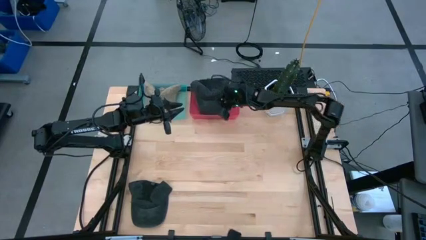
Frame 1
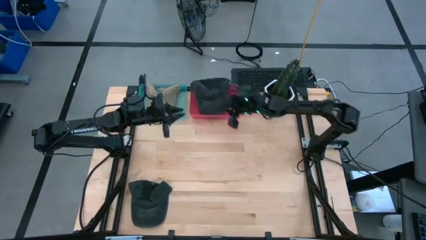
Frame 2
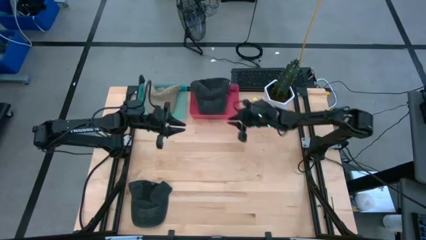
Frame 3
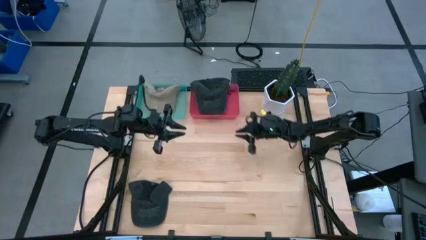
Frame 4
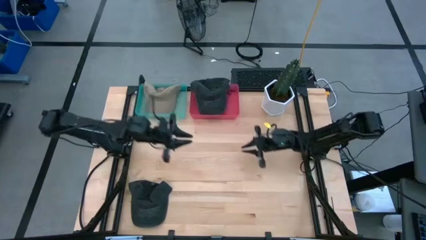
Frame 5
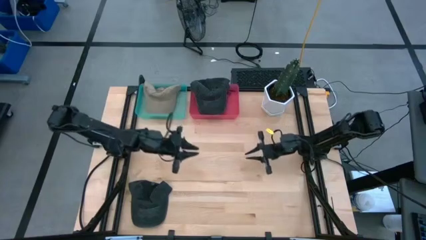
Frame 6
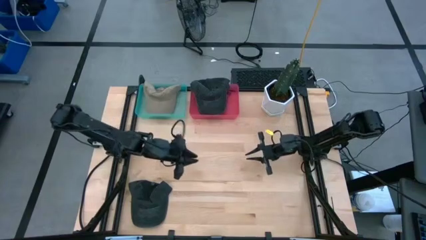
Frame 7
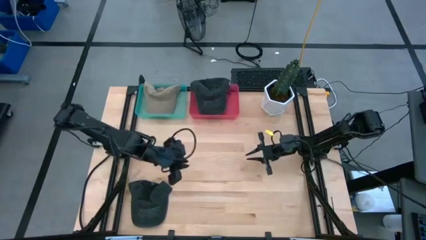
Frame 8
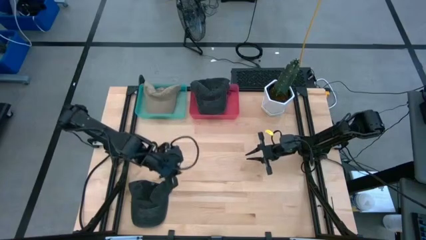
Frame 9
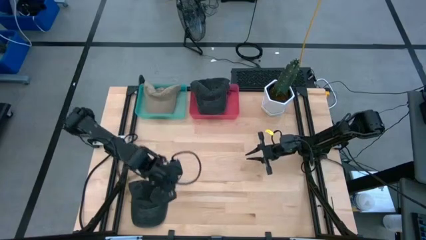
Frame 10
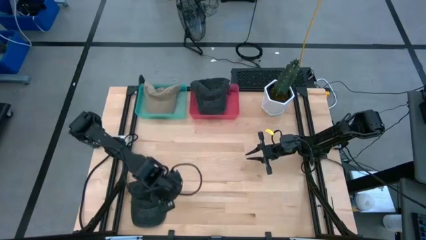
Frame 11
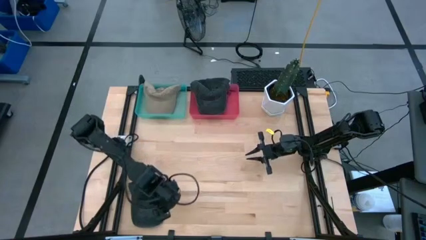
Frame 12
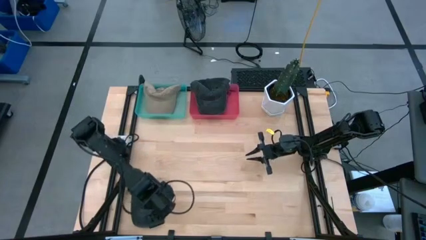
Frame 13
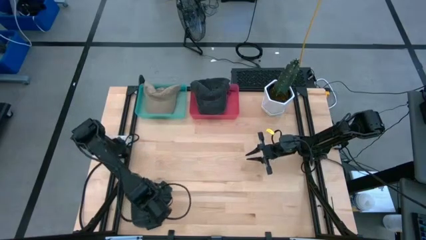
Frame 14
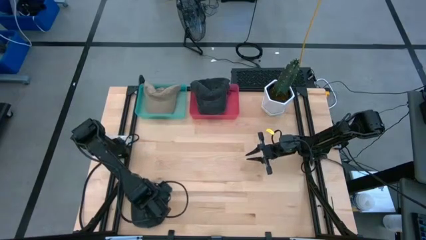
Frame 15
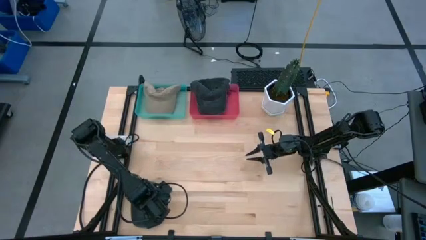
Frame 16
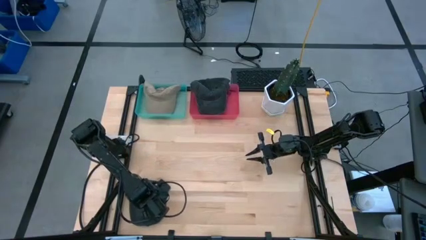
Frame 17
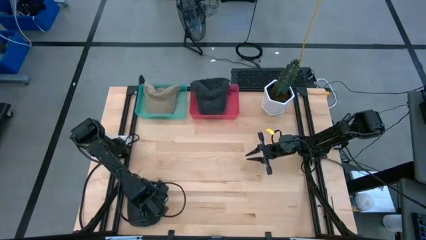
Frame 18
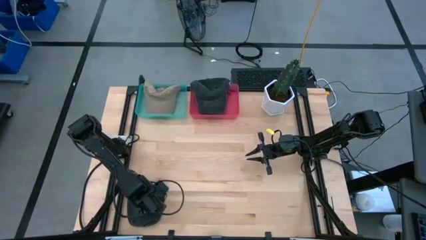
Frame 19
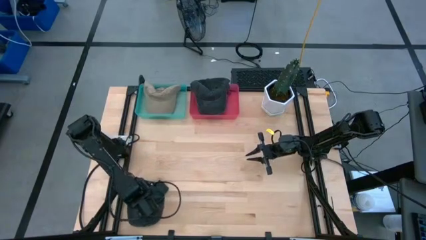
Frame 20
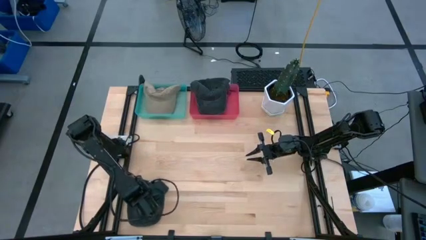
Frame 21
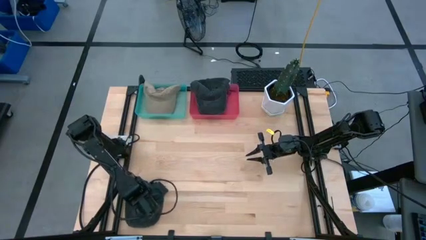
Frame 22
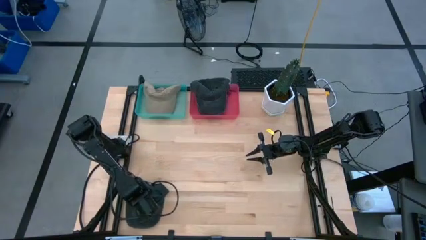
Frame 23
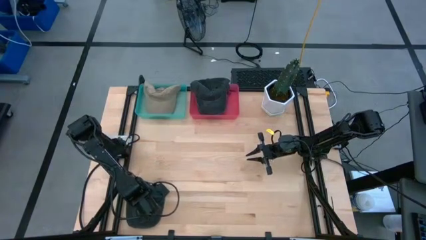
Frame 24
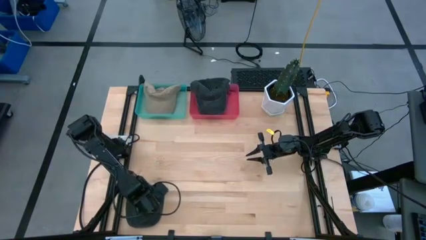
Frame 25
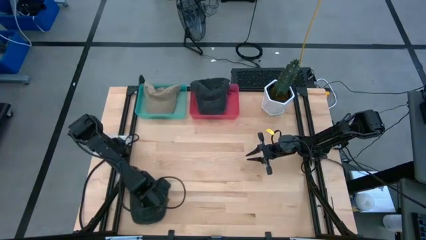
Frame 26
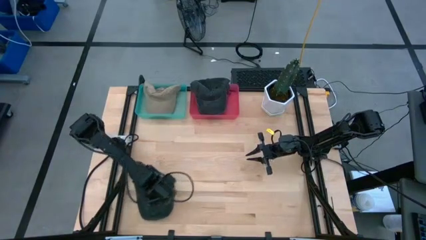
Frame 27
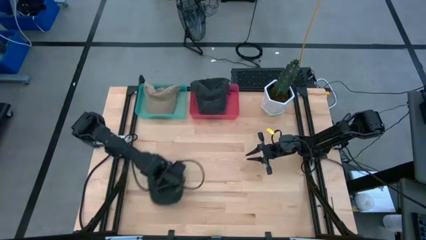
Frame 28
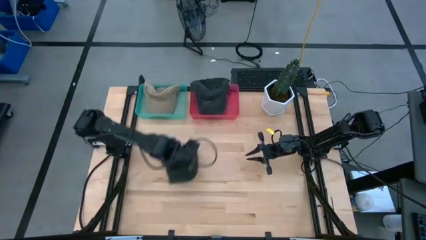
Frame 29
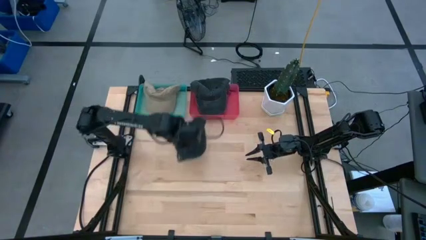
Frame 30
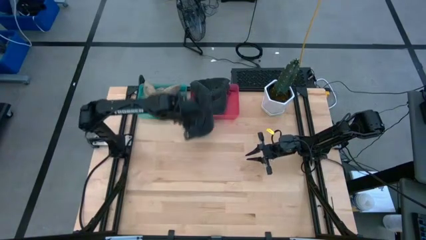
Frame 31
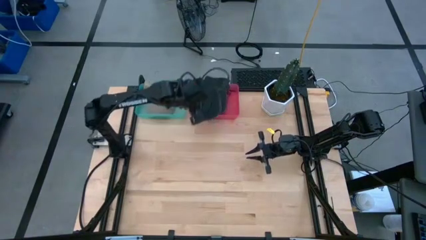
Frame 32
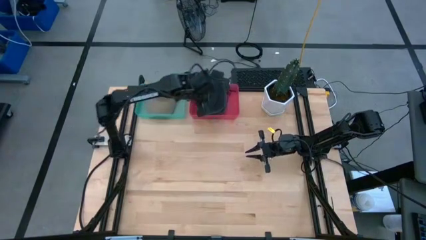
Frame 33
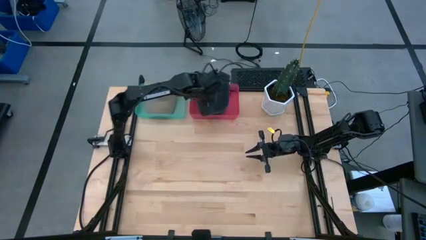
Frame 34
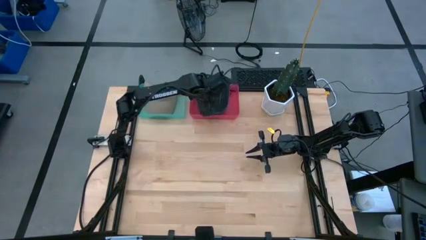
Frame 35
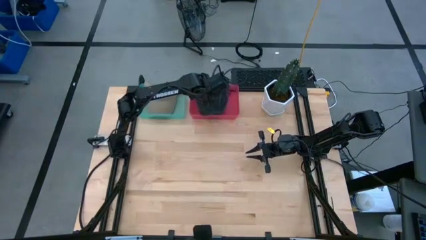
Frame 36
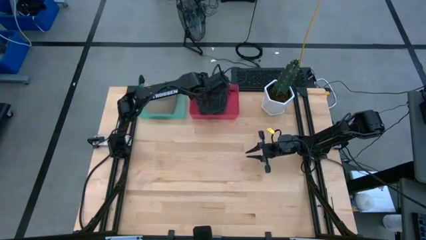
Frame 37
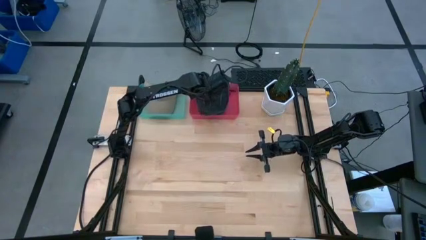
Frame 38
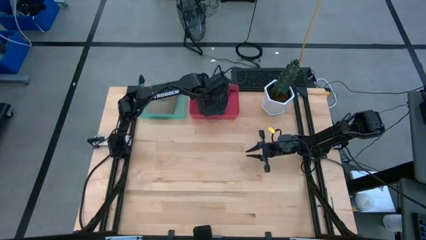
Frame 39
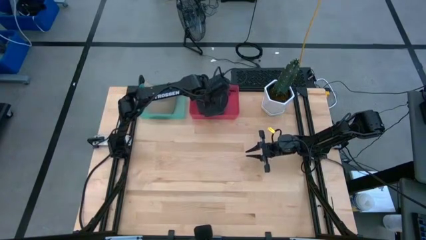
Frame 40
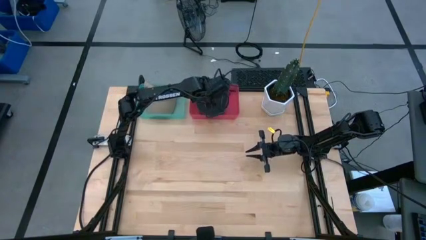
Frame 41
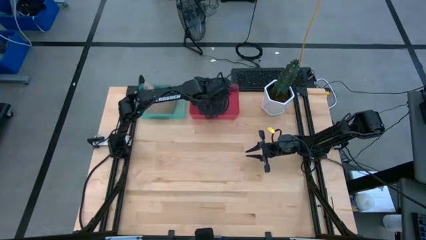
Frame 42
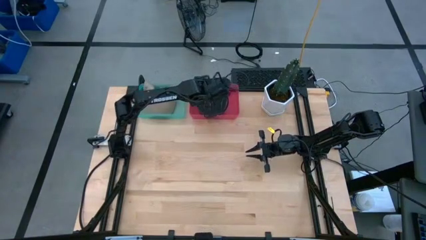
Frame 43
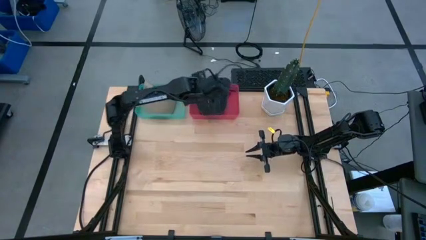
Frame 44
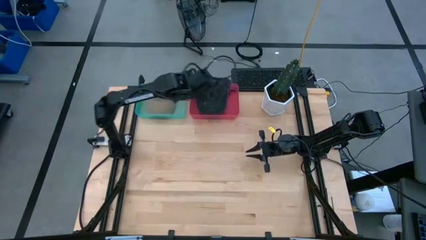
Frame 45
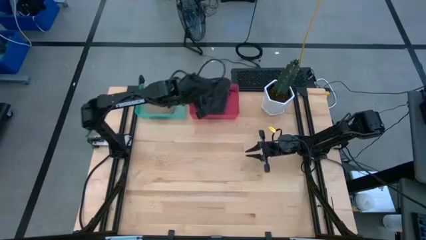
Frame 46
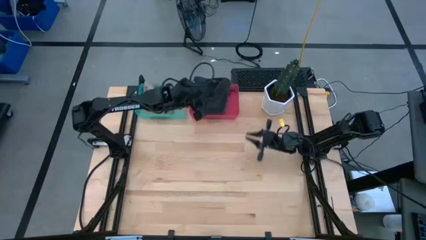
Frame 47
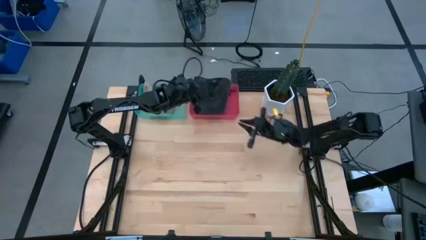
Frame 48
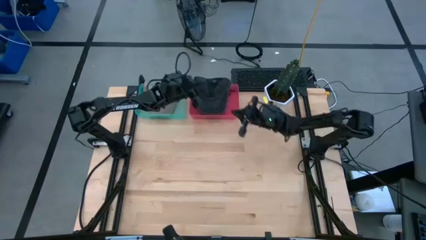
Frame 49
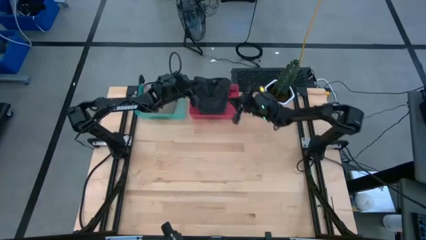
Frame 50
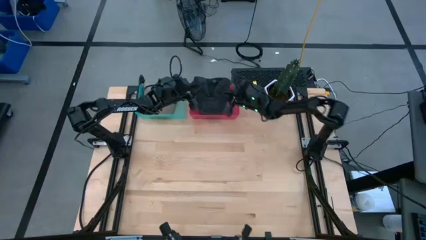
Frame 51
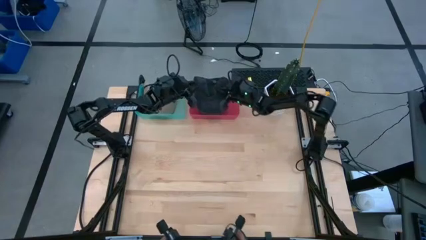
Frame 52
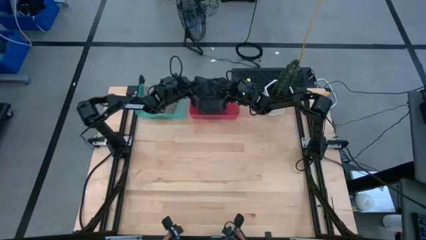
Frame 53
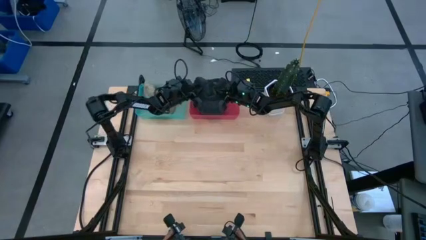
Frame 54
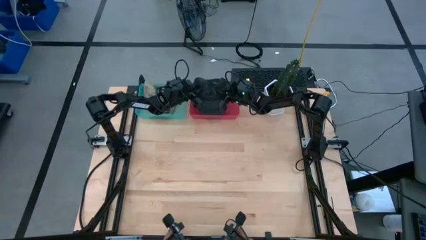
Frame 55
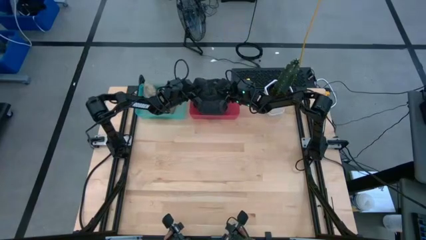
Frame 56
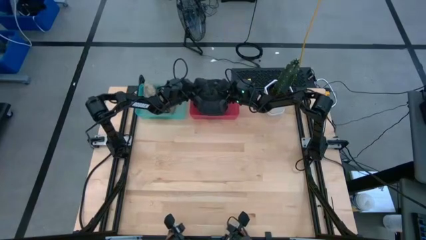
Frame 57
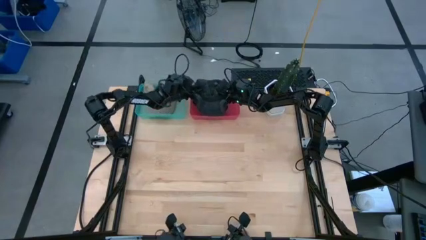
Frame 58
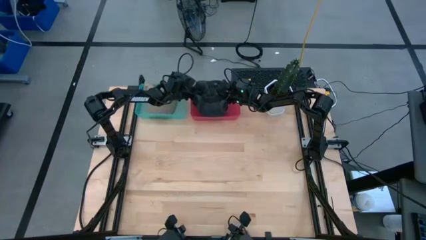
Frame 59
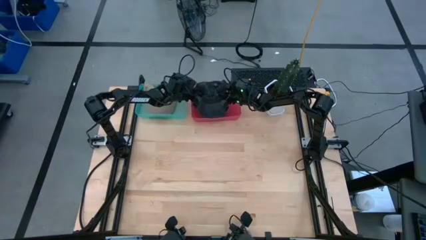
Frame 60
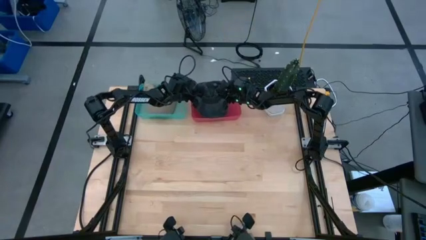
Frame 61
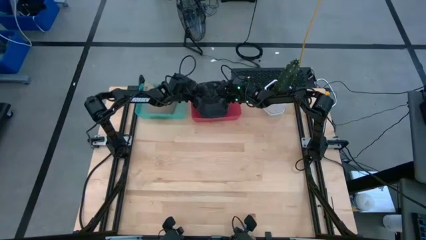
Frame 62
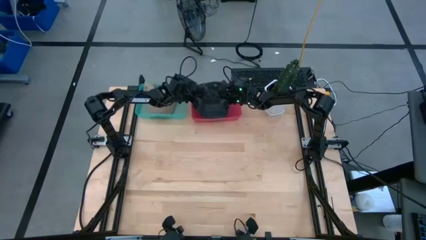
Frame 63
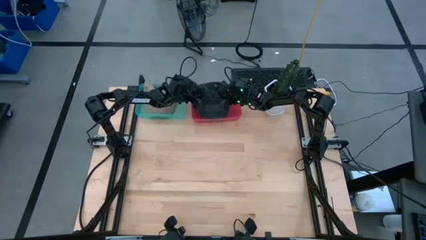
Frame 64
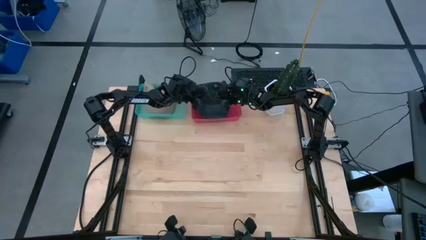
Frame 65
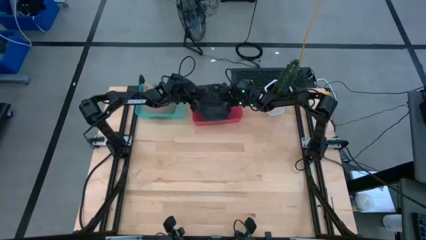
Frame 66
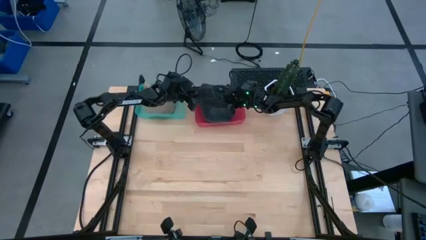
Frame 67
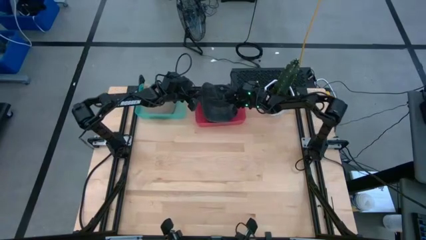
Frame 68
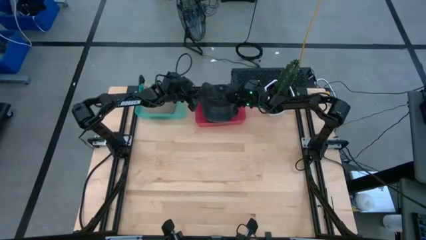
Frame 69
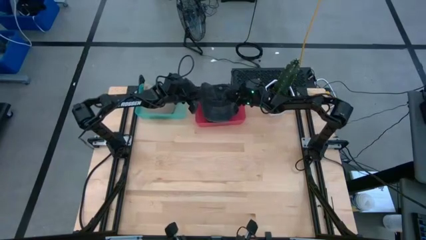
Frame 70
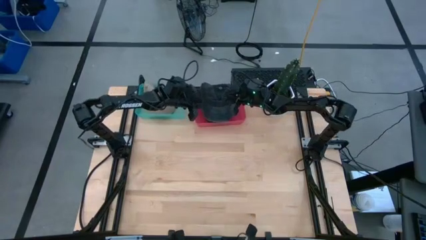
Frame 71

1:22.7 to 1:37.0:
Task: Pick & Place hat
Put the black cap into the red bin

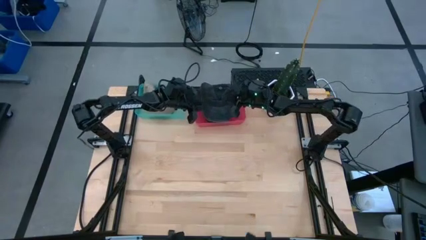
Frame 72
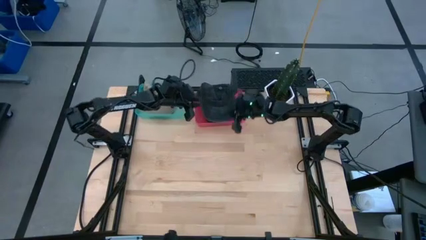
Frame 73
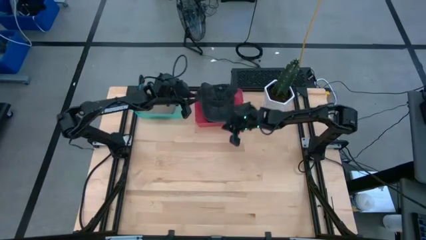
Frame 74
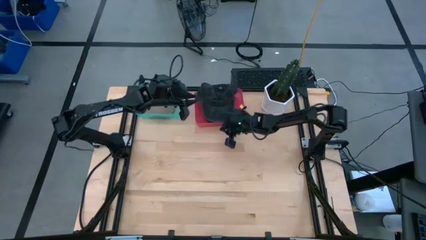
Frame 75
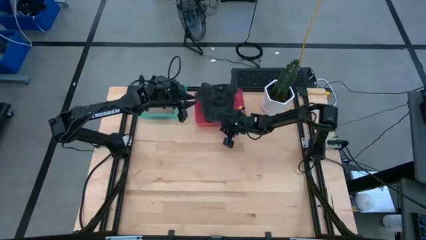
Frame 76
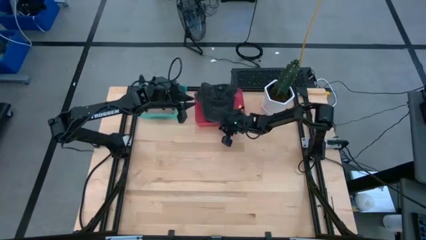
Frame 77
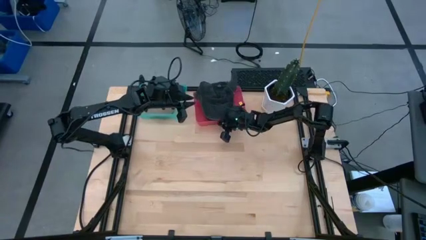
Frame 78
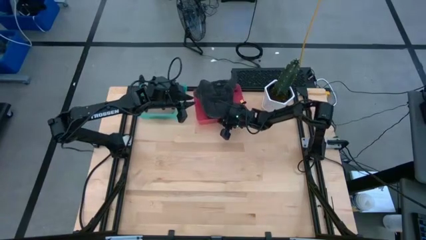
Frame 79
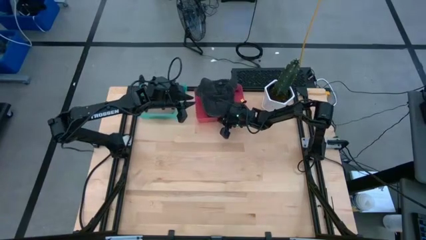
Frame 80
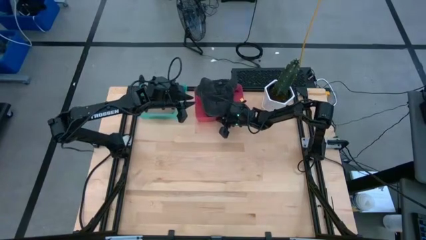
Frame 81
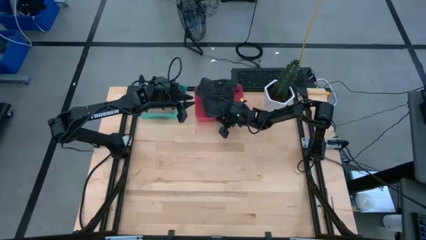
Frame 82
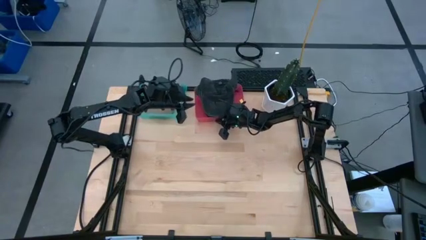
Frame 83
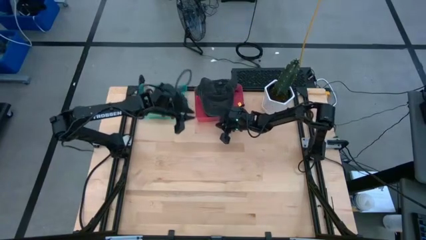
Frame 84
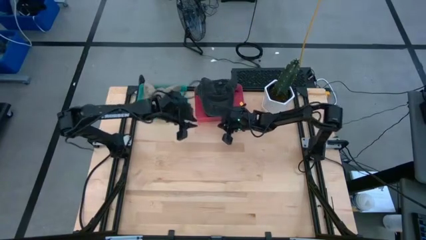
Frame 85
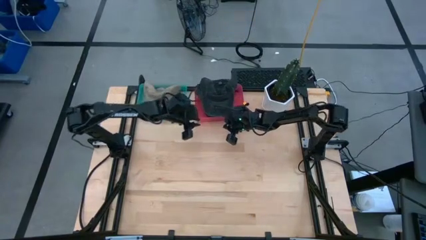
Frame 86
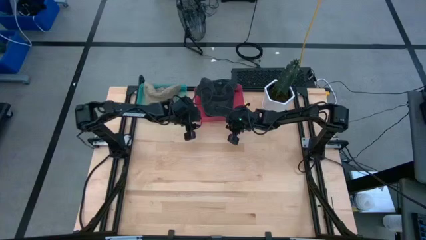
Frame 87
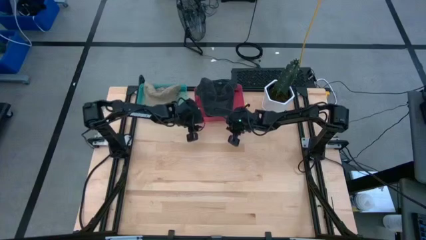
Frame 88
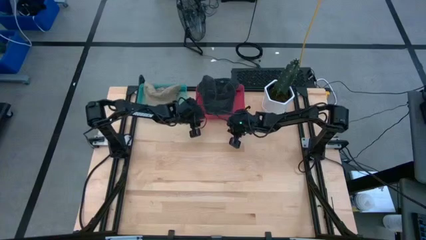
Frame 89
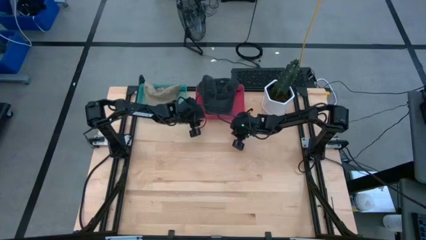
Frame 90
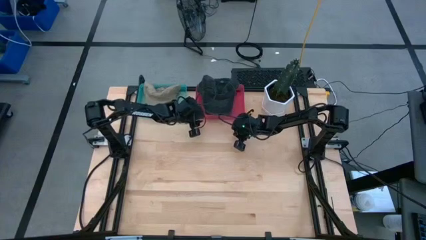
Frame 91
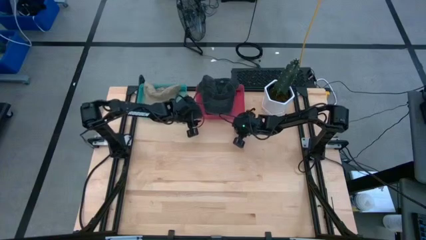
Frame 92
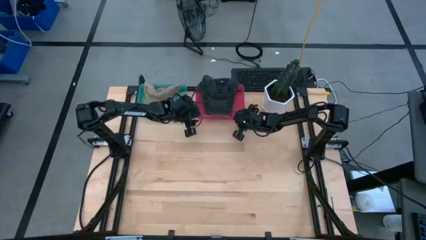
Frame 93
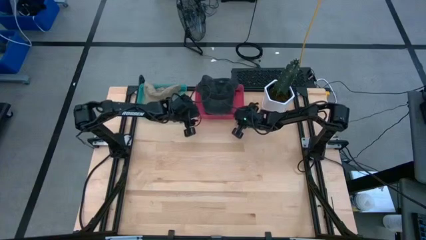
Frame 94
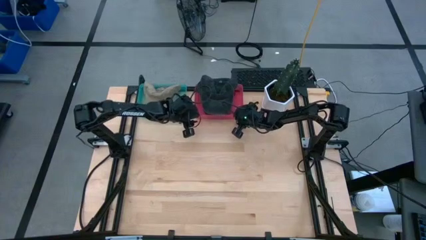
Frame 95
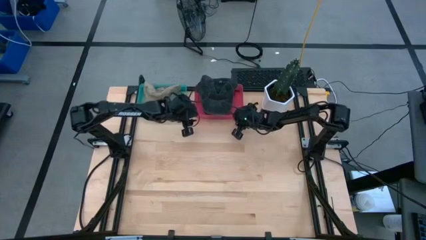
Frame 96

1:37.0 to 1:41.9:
Adjust the red bin on the table
